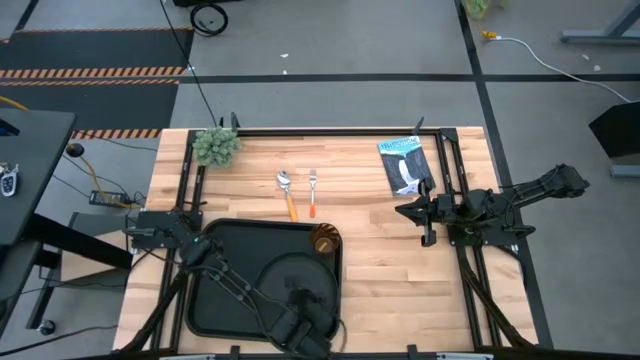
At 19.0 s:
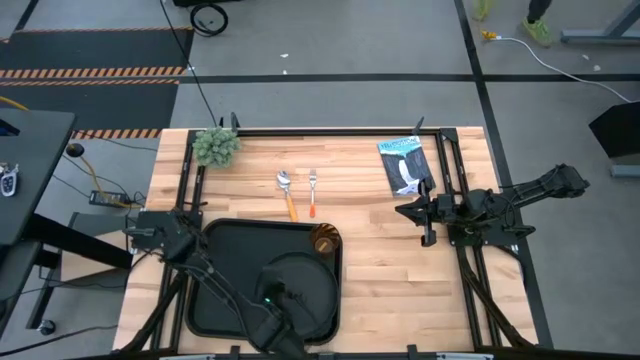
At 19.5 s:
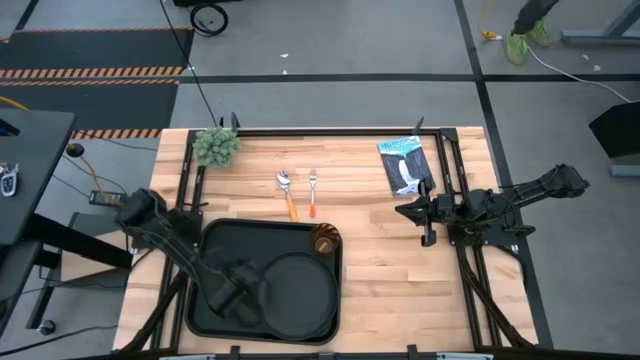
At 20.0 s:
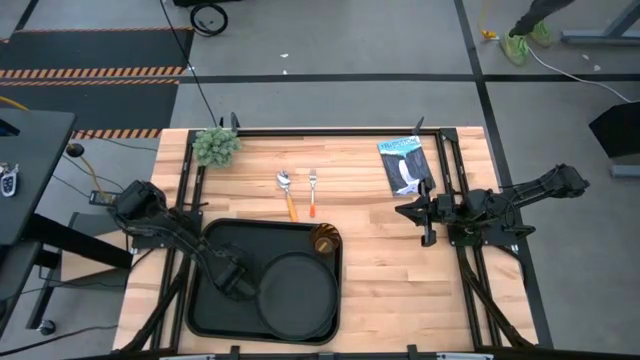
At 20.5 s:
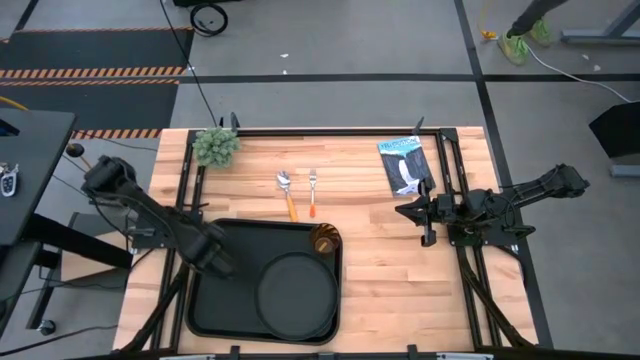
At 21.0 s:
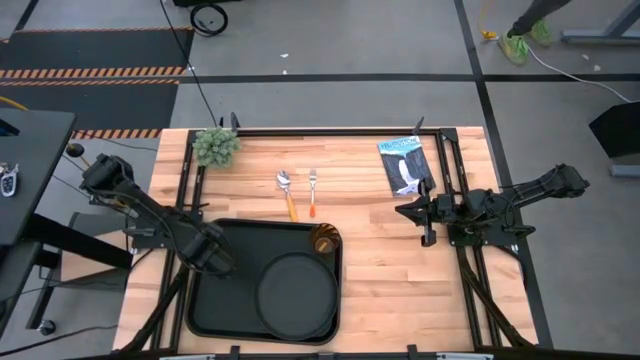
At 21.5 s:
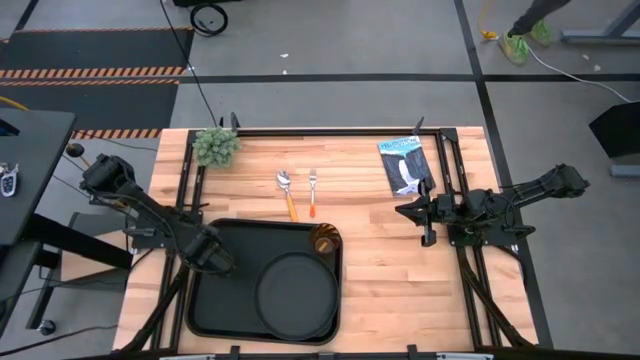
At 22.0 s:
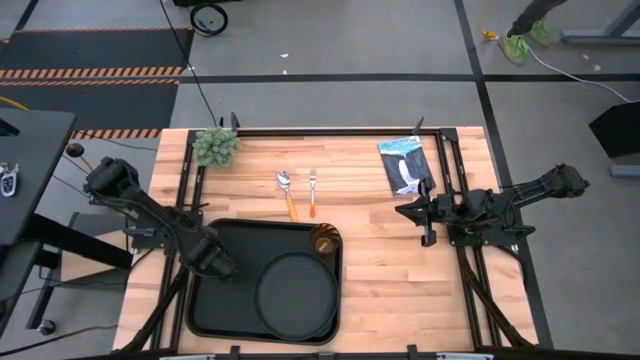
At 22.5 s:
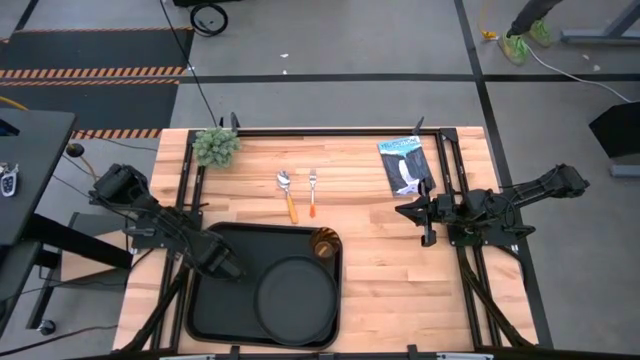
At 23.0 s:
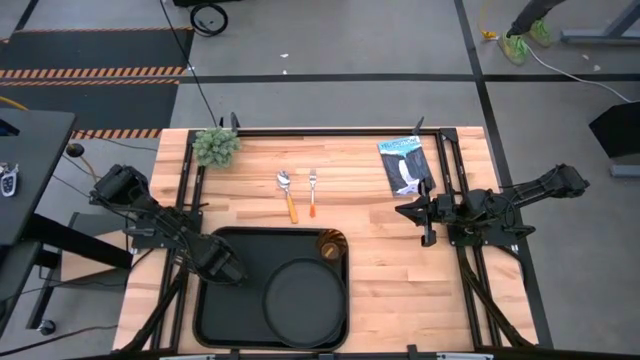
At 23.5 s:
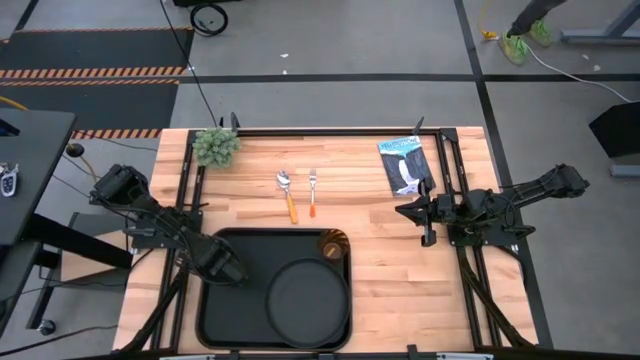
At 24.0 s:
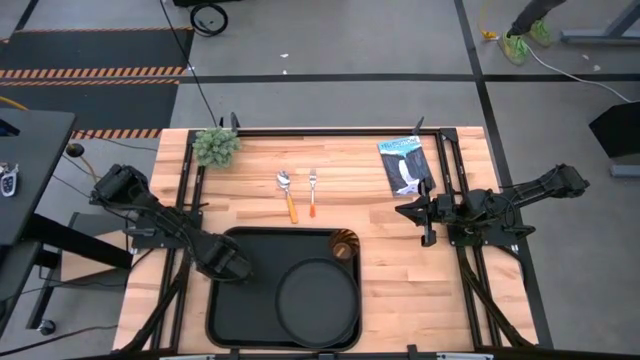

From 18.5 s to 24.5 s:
Task: Pick and place plate/cup/fork/spoon on tray
Adjust the black serving tray

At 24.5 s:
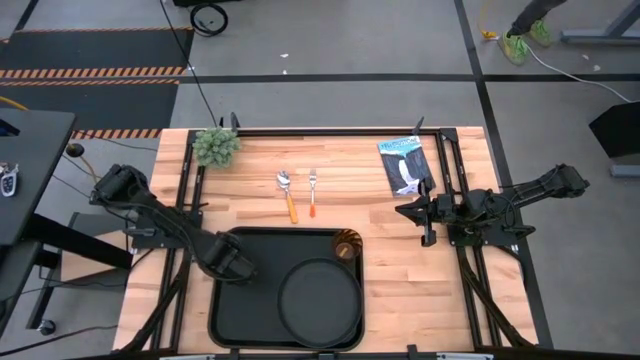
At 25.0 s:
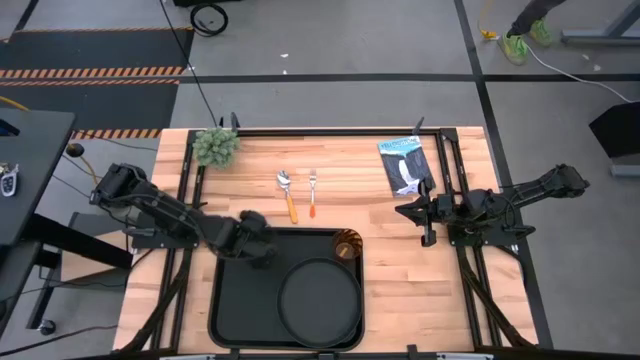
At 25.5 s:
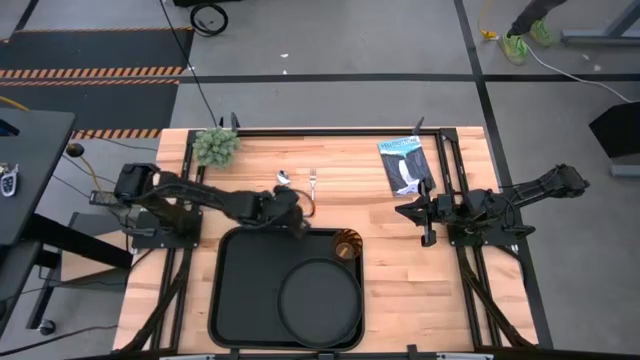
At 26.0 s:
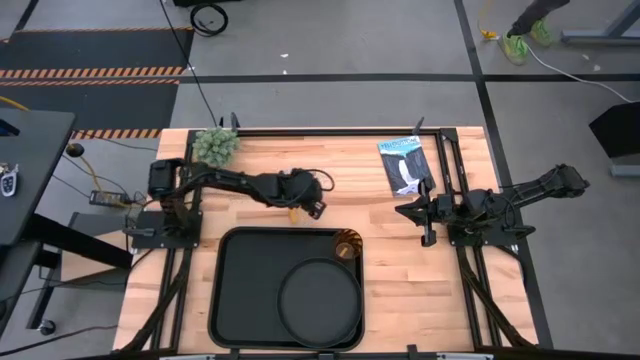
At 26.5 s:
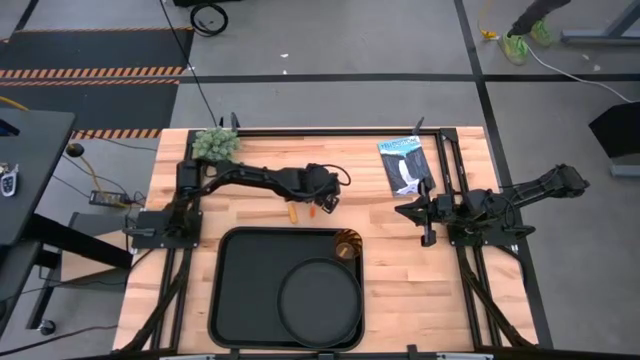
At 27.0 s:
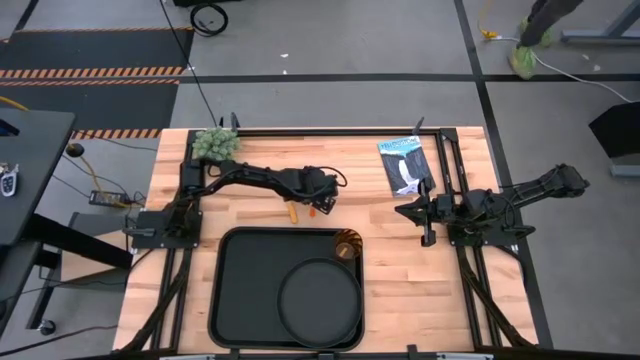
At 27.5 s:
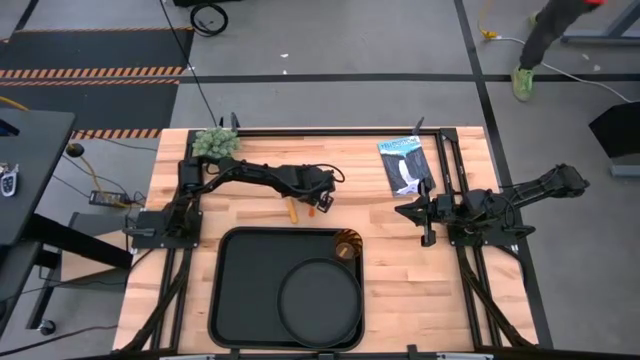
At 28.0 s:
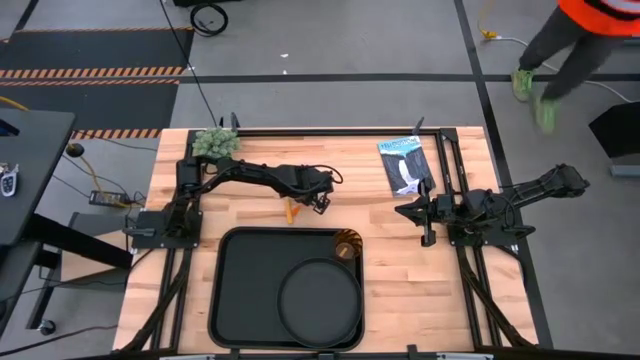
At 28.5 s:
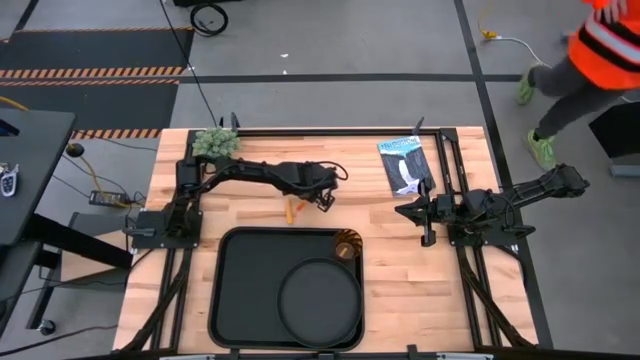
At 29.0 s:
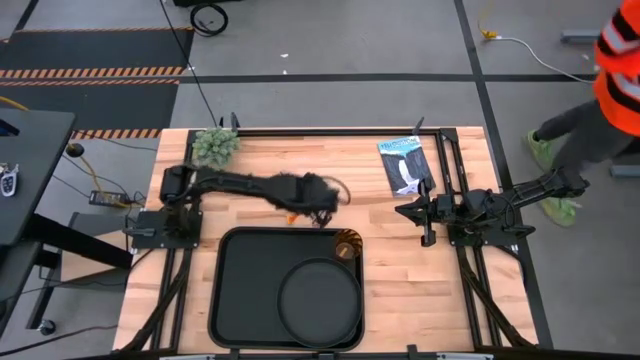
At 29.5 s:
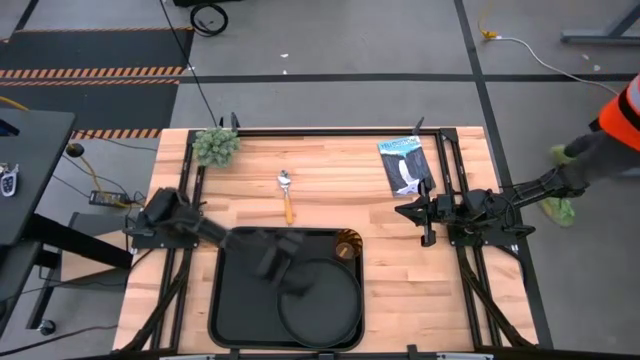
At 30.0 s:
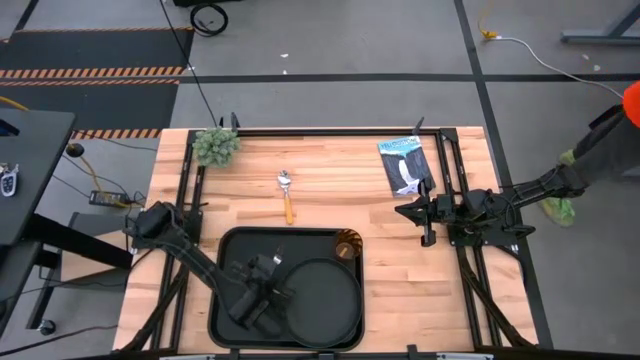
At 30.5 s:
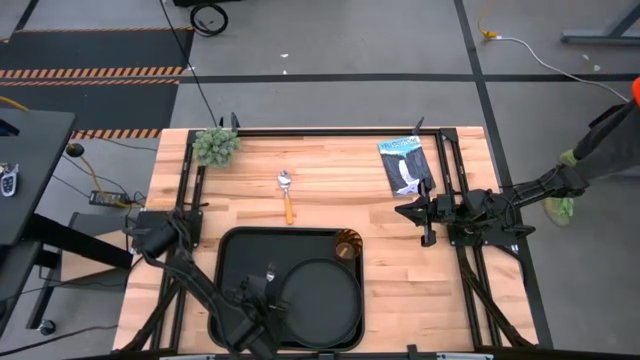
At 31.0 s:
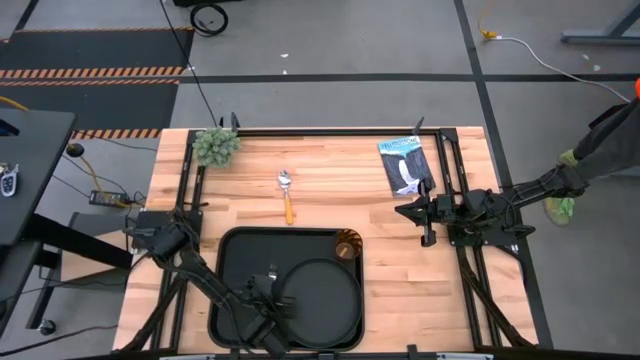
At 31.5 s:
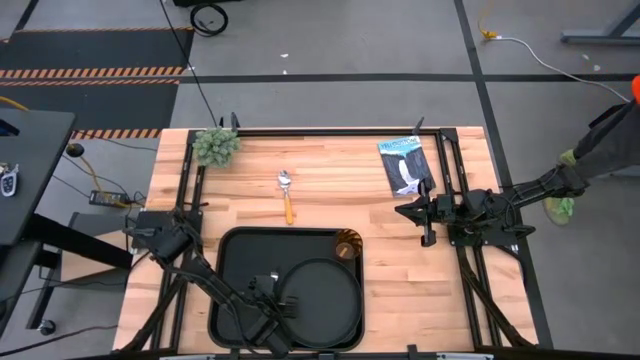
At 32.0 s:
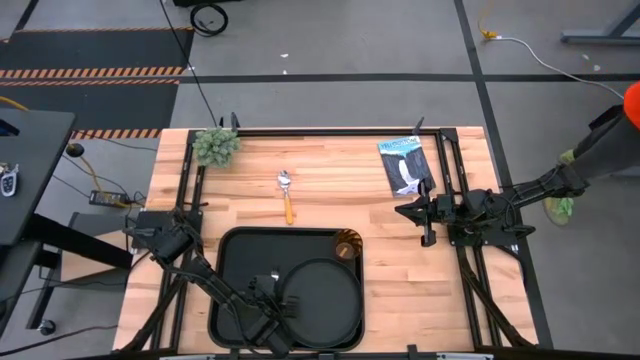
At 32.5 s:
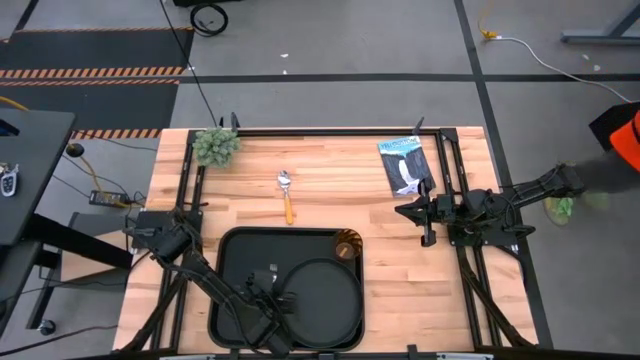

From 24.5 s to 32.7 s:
Put the orange fork on the black serving tray

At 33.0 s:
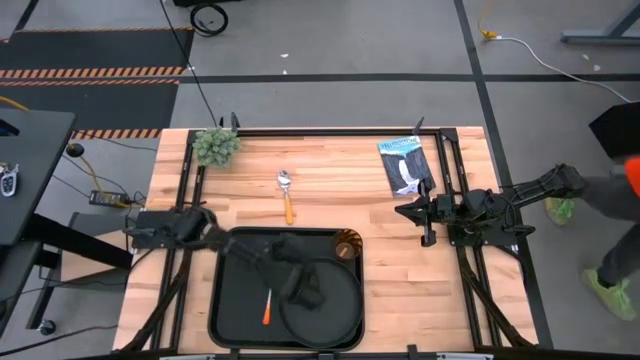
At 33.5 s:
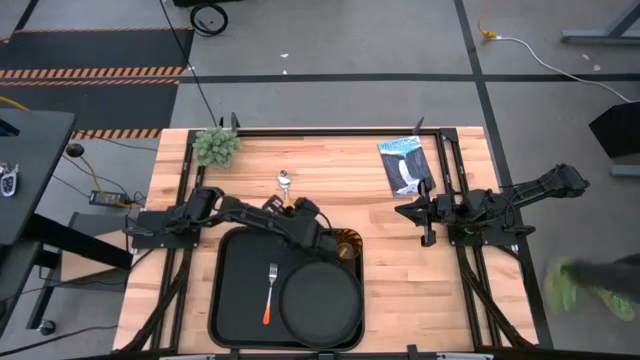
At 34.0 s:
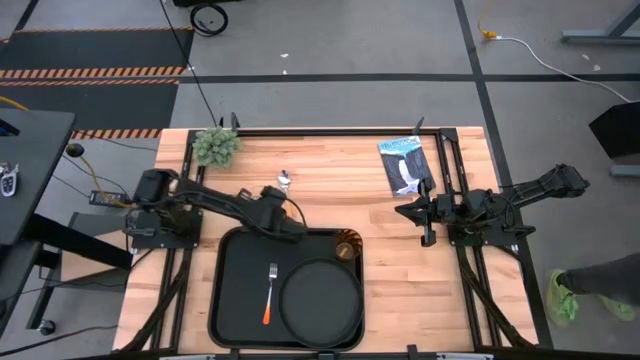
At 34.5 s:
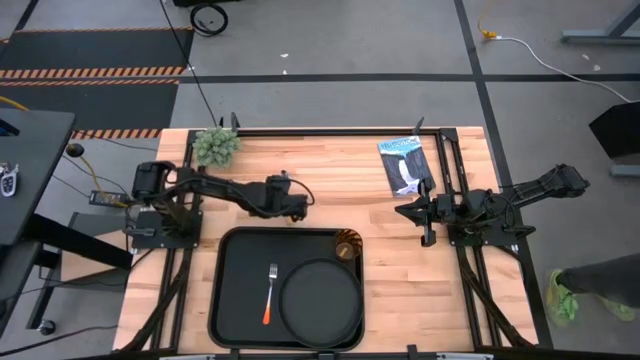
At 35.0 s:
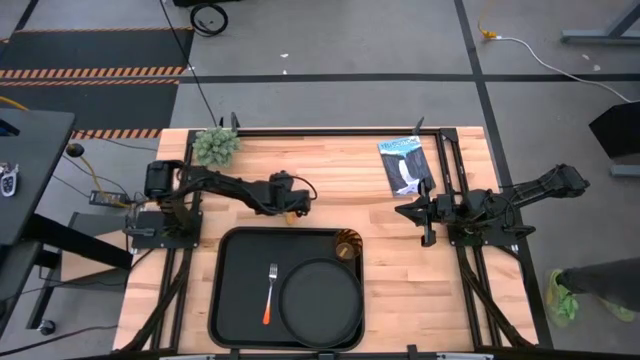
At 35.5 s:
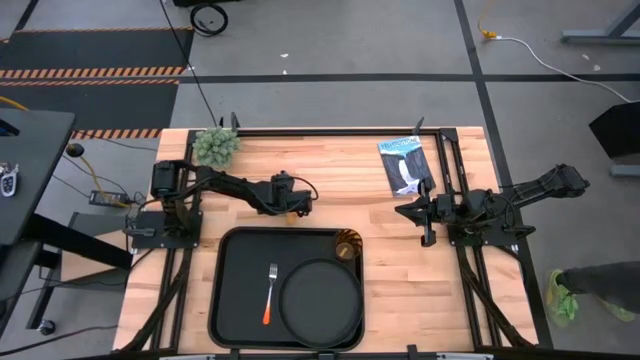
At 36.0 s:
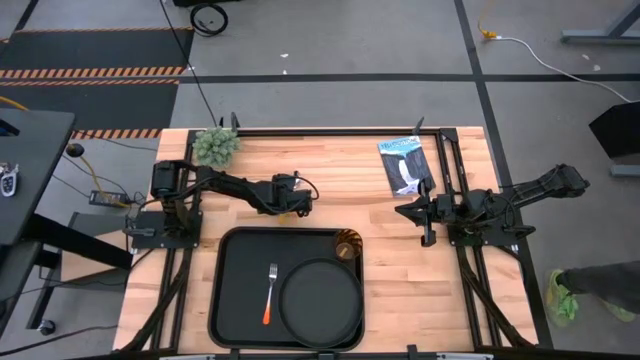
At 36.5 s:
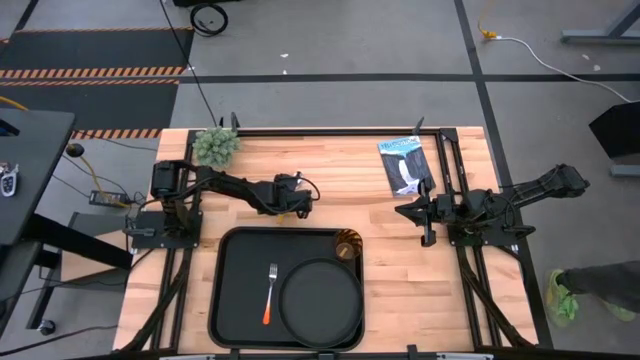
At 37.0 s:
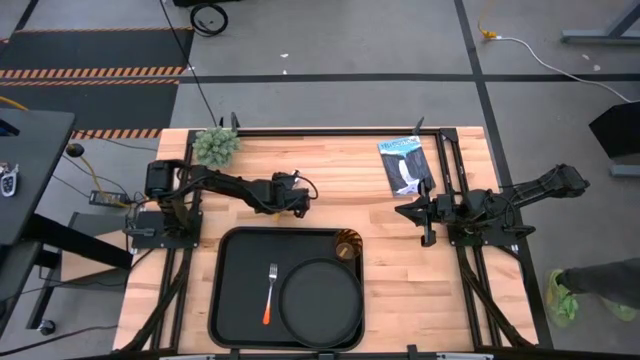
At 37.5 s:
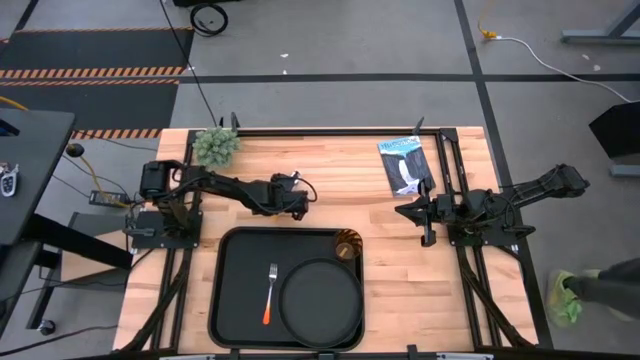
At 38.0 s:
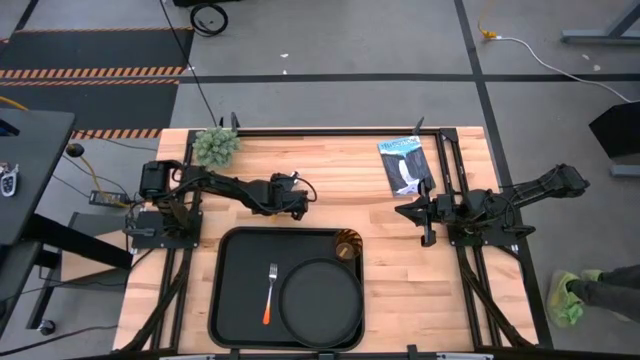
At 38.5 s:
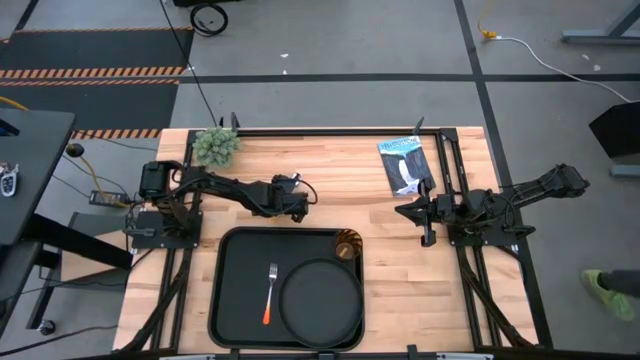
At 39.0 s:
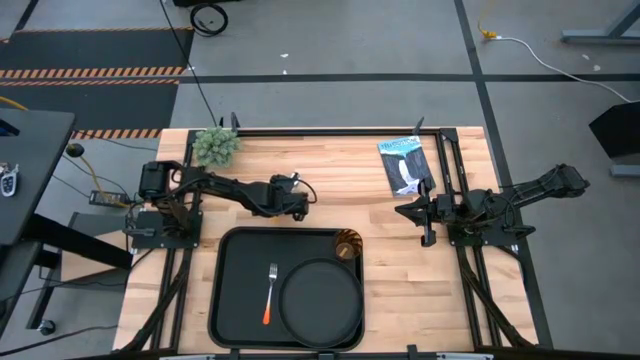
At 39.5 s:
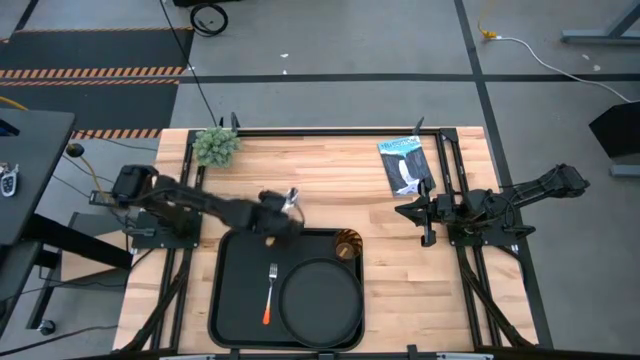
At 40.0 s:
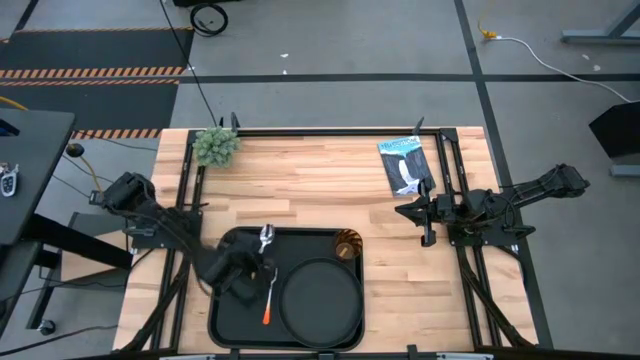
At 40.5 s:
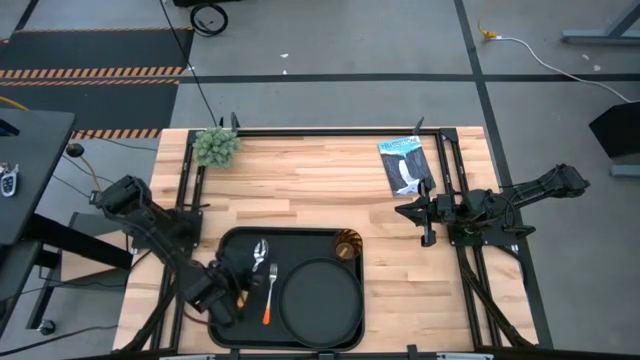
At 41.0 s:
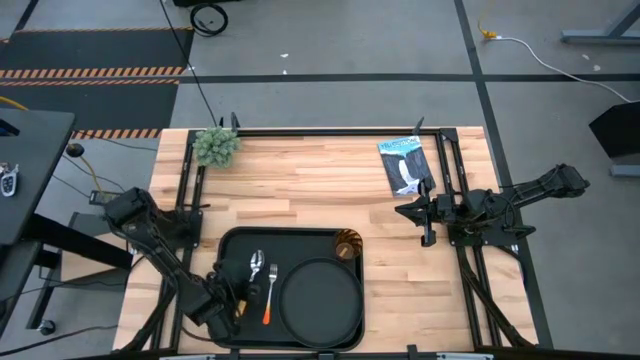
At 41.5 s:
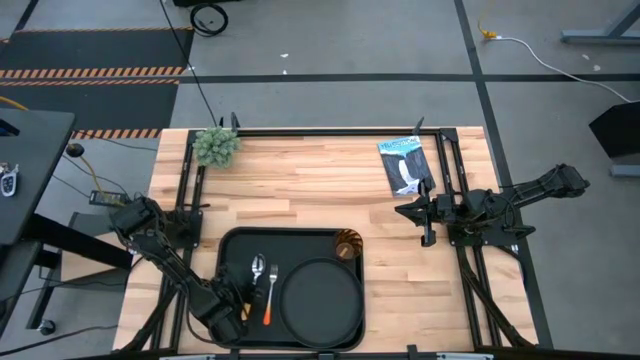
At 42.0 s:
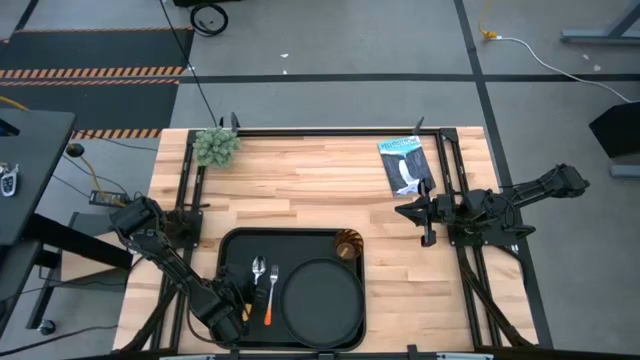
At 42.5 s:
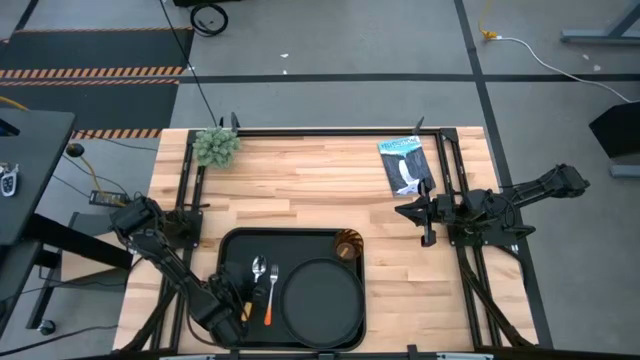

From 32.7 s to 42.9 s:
Put the yellow spoon on the black serving tray
